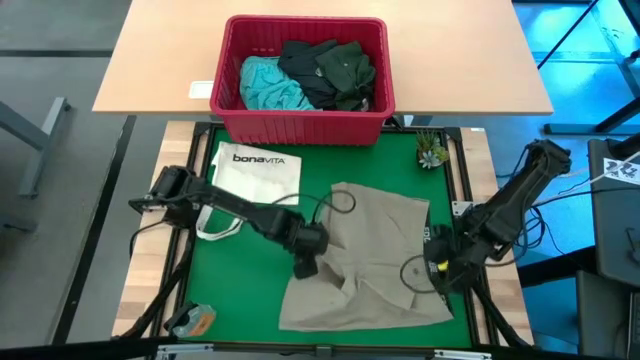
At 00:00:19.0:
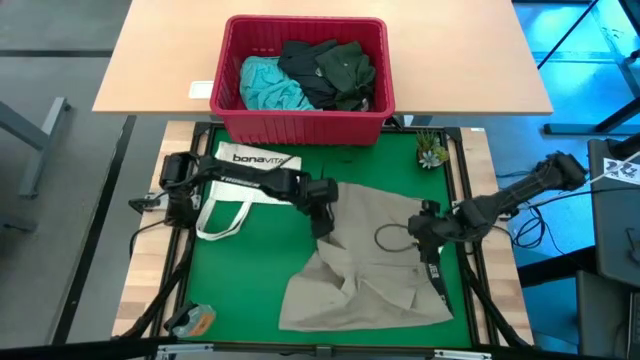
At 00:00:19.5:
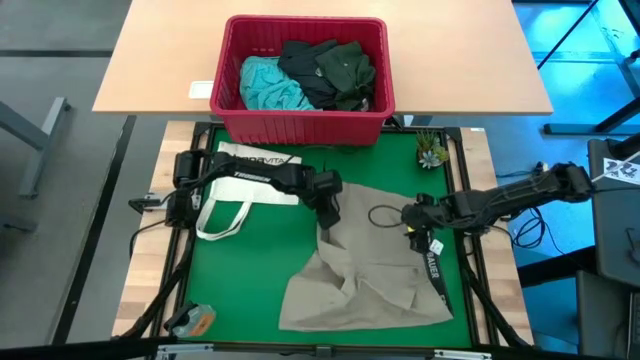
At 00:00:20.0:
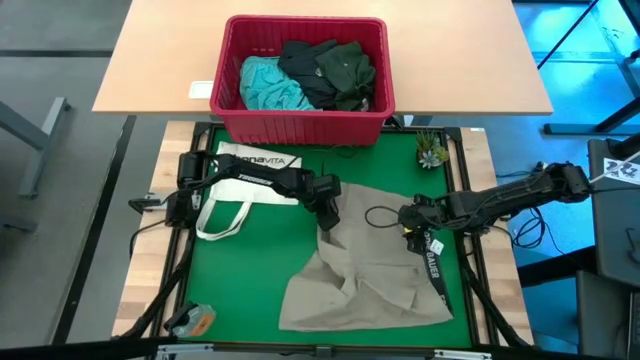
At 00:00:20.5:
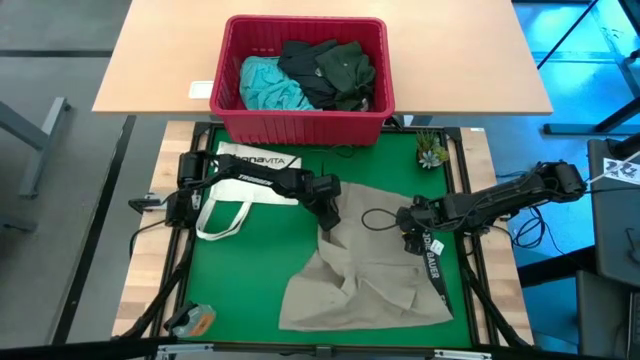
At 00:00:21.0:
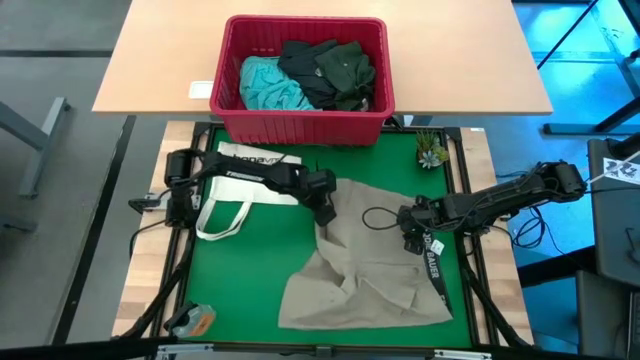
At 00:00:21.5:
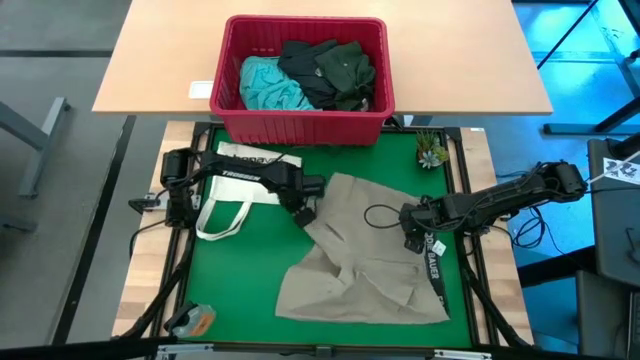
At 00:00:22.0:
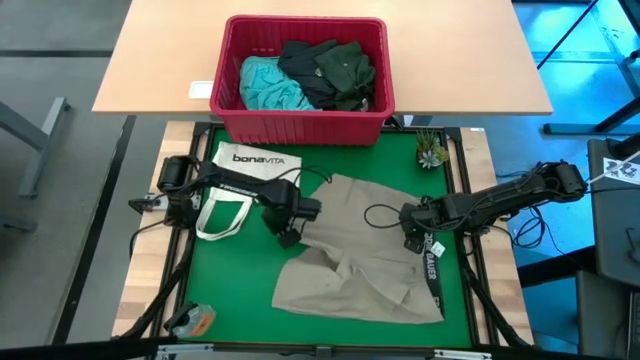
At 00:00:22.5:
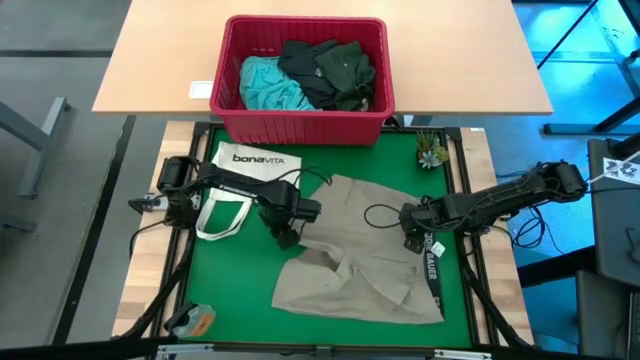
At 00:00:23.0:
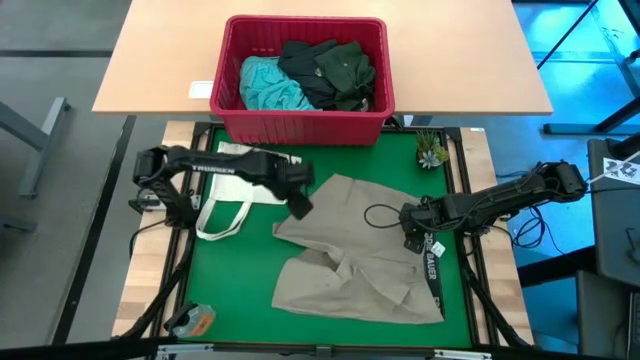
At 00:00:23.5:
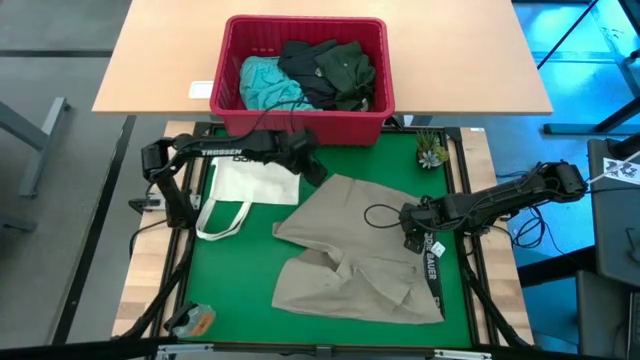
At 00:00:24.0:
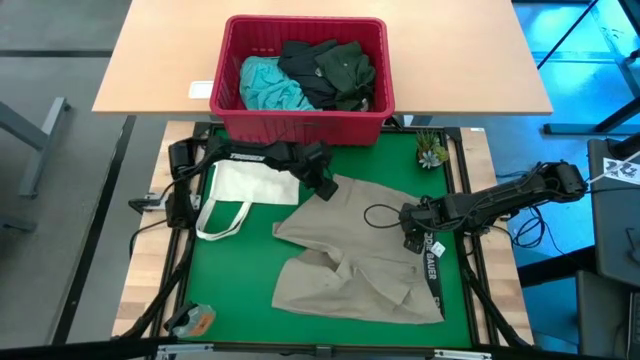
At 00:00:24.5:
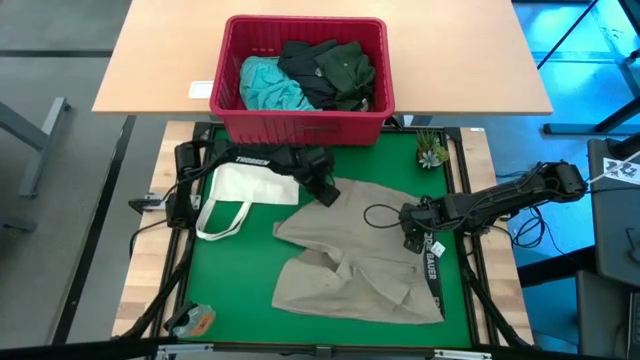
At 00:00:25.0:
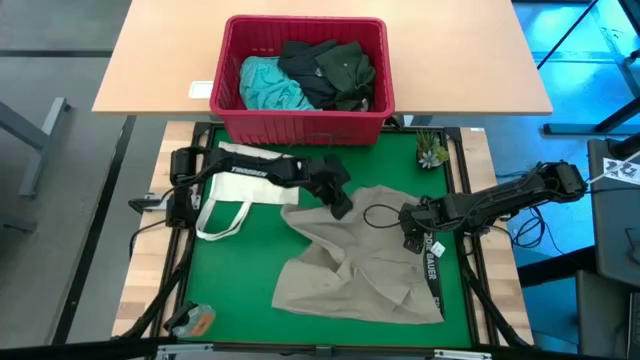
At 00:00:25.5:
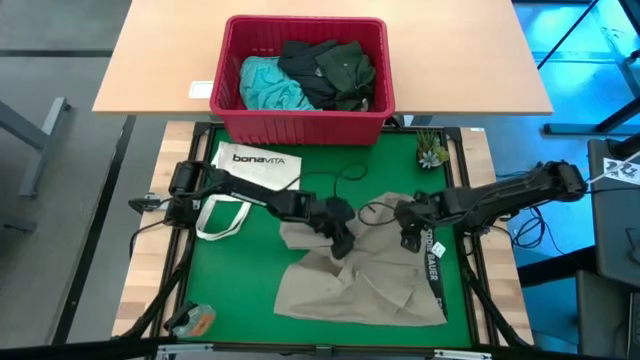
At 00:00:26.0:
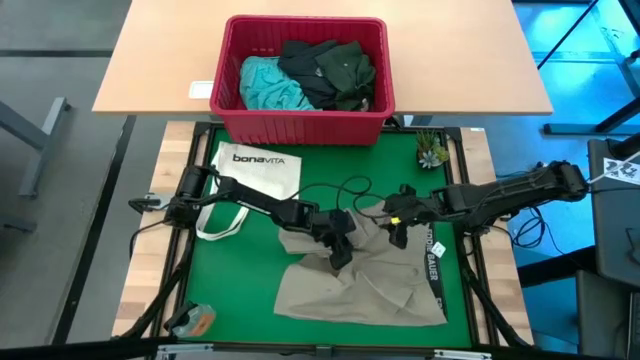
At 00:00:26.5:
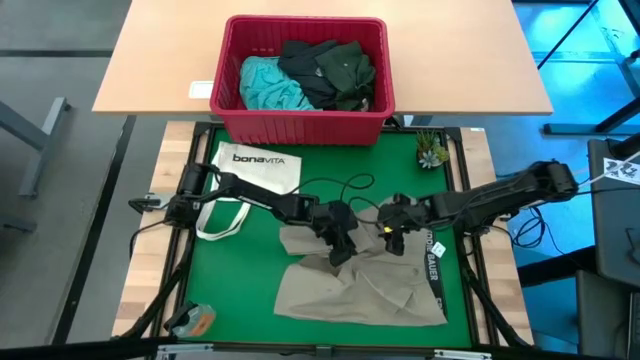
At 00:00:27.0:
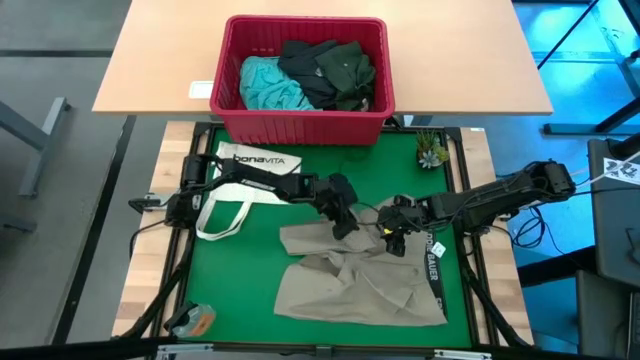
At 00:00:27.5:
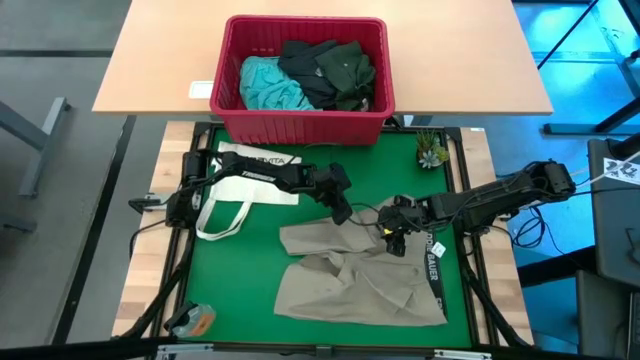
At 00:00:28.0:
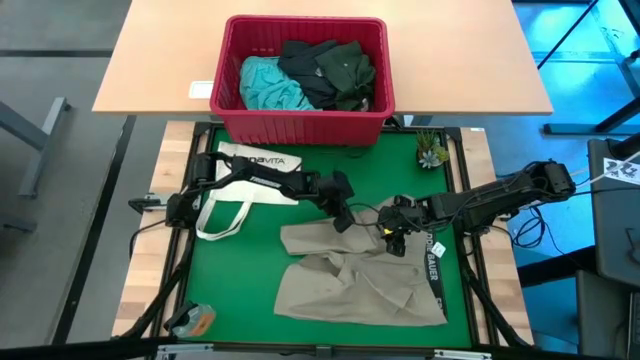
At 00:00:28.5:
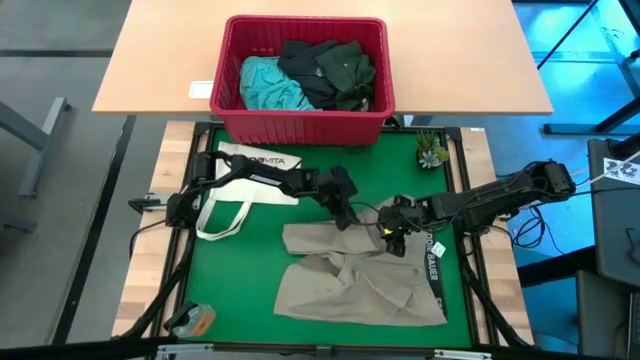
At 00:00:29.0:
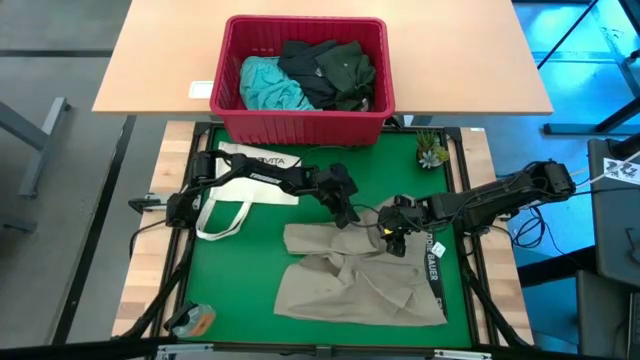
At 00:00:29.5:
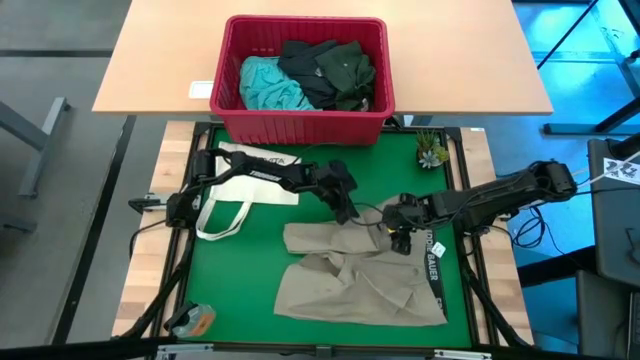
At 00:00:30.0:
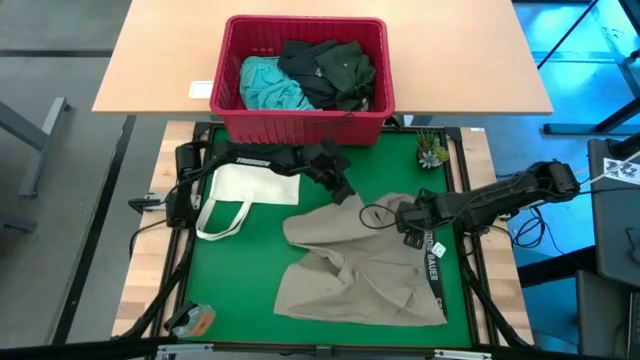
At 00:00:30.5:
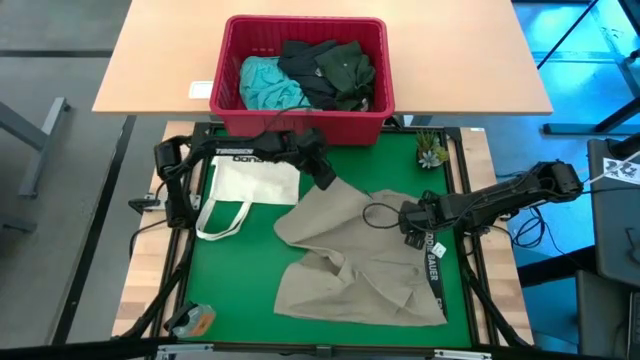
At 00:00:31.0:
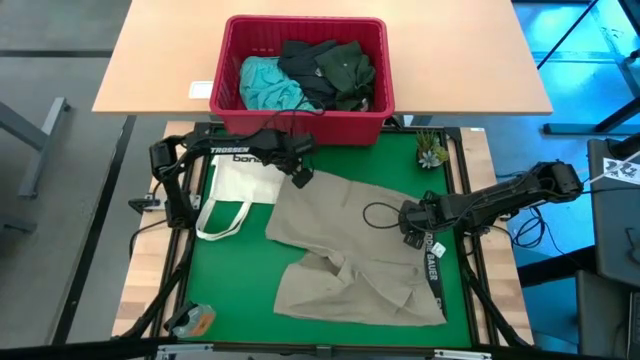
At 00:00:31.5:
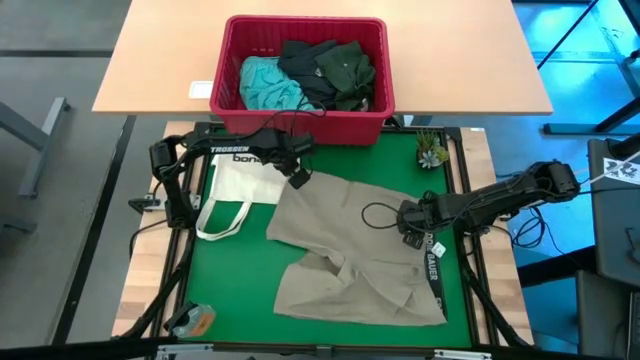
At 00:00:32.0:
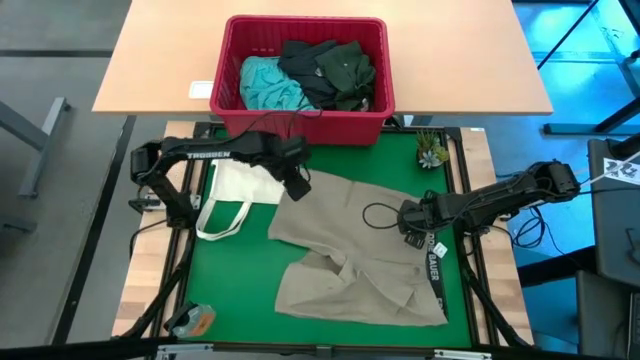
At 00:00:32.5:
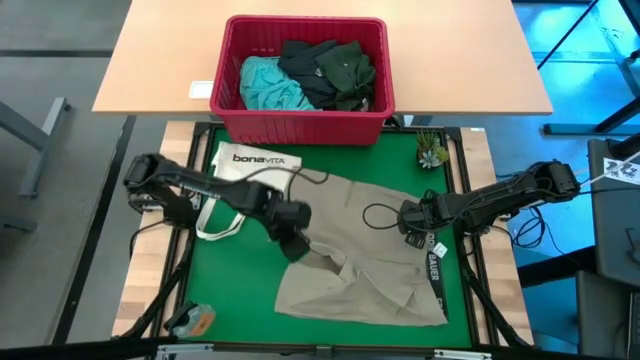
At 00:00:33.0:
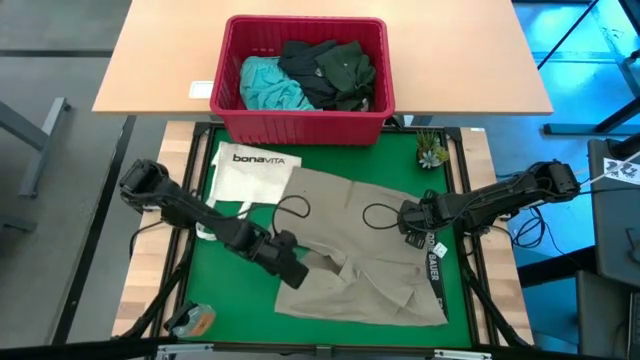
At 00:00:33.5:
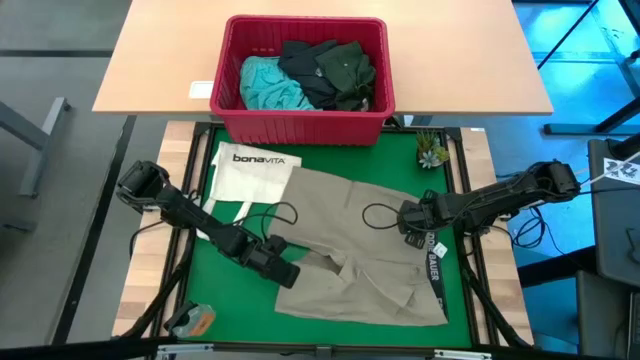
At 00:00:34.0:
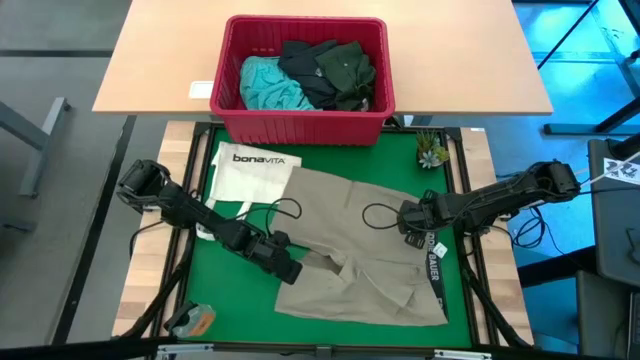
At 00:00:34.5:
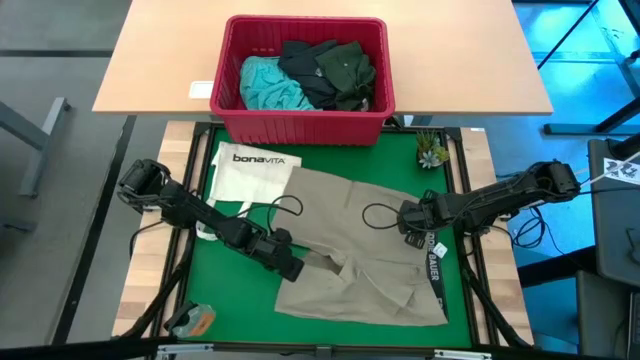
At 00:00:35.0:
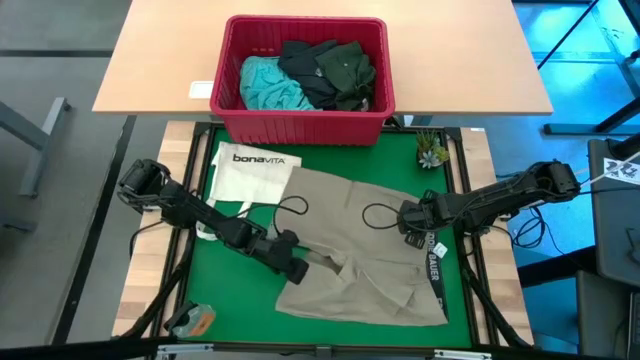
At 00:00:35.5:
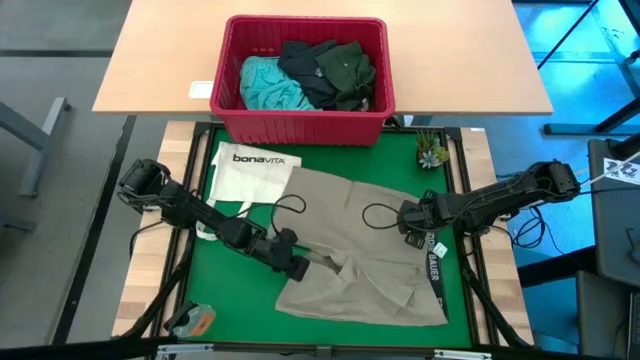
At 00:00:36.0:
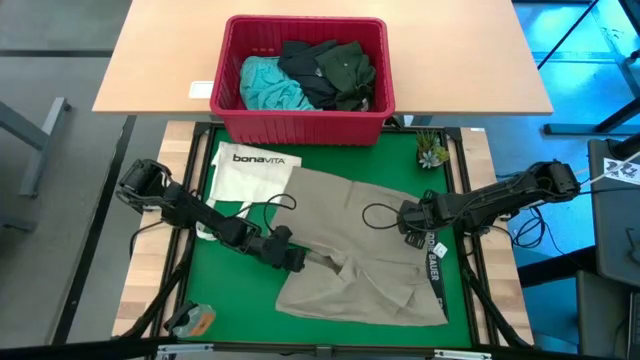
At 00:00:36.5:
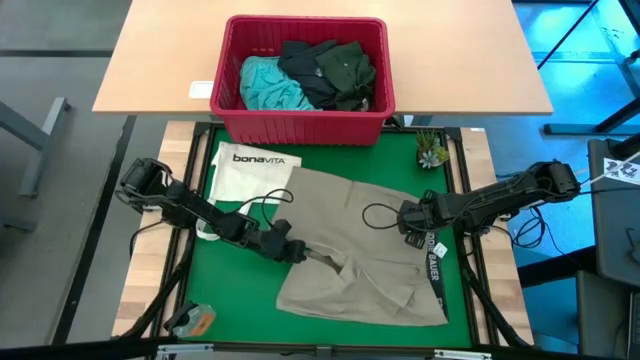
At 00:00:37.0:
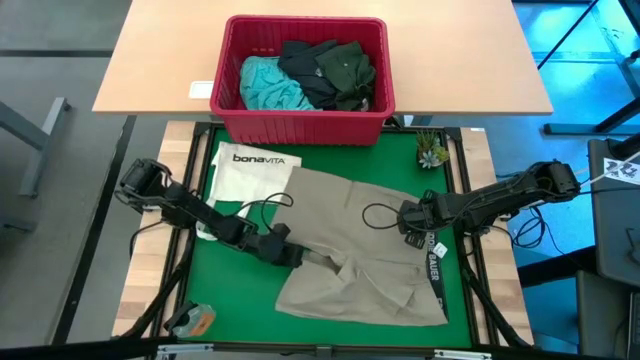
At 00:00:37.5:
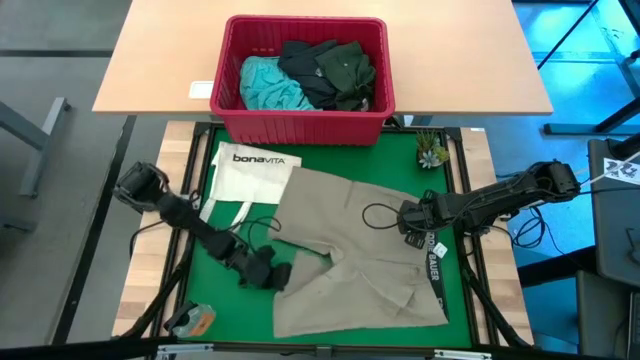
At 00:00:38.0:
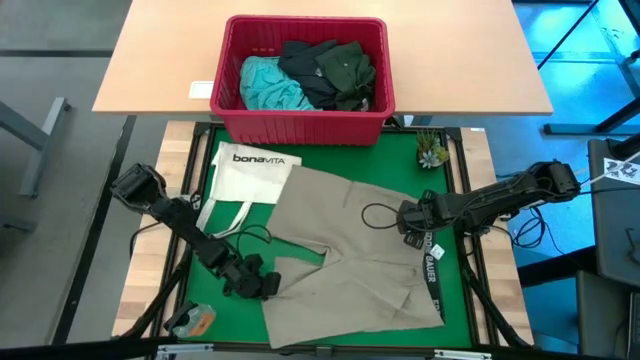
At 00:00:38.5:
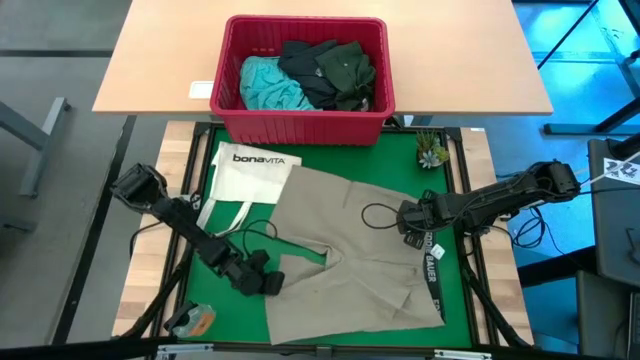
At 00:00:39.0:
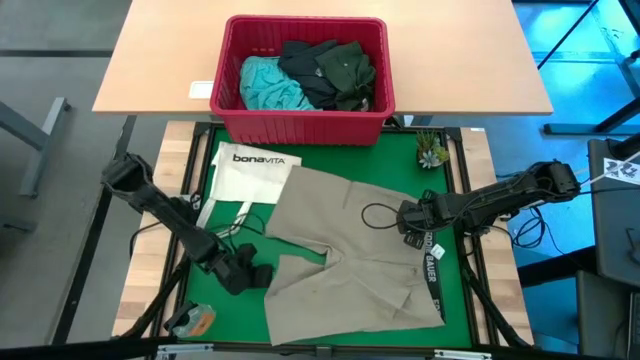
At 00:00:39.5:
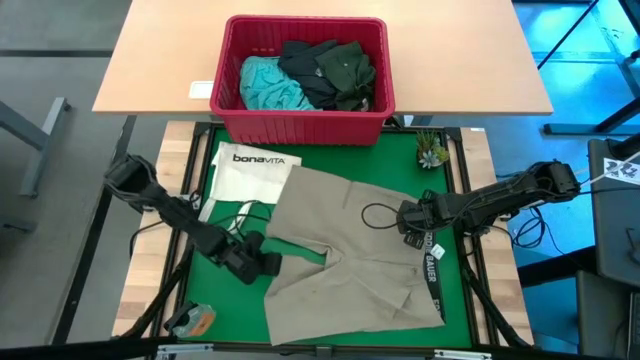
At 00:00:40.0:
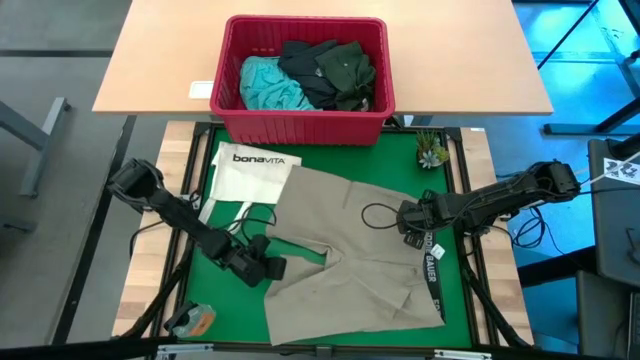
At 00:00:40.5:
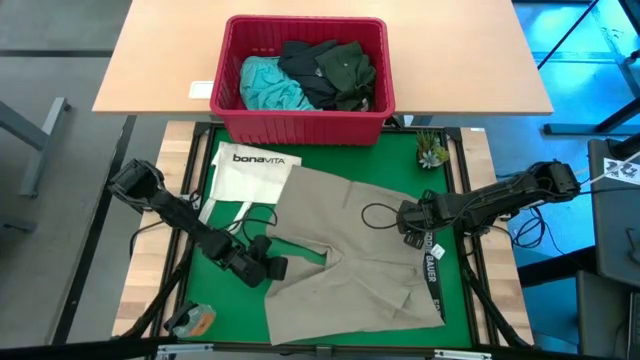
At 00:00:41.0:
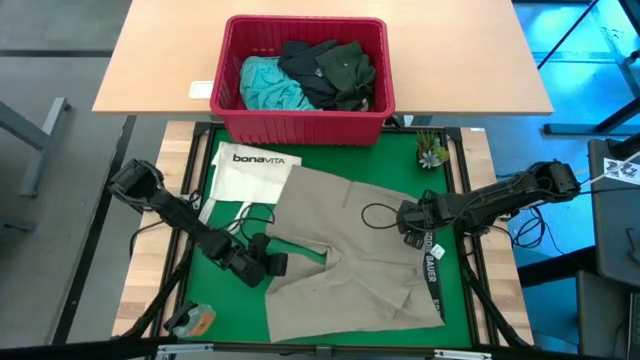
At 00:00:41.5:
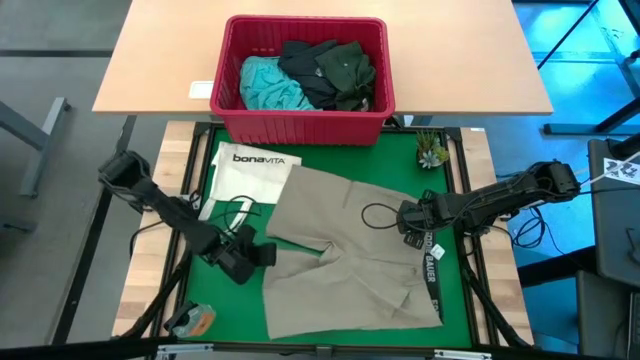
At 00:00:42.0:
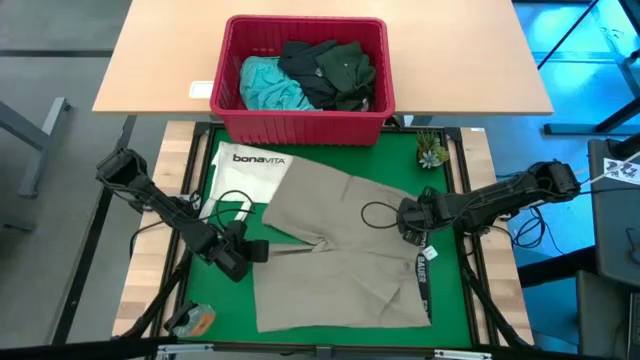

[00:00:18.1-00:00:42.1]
Task: Fold Laundry from Bin
Fold the light brown shorts
